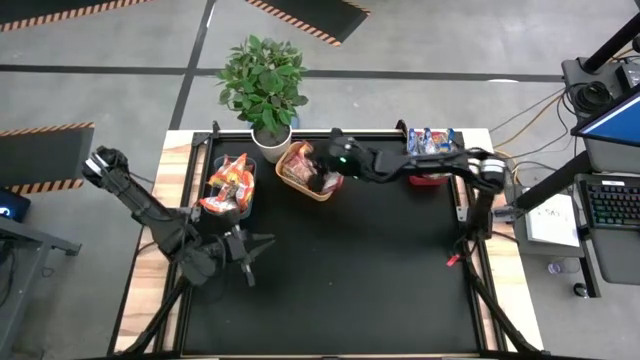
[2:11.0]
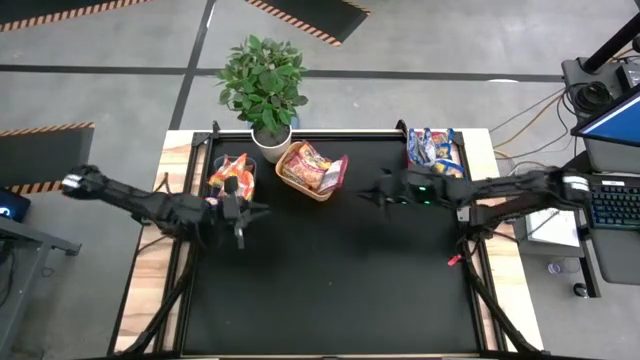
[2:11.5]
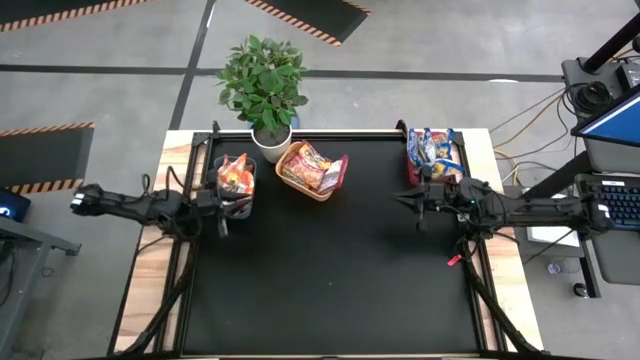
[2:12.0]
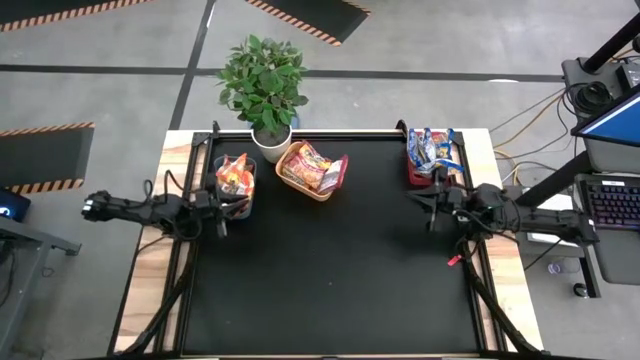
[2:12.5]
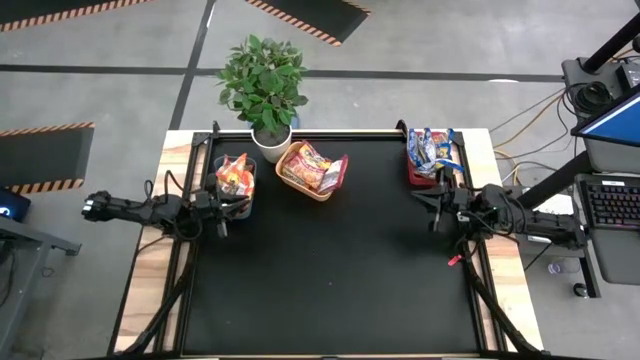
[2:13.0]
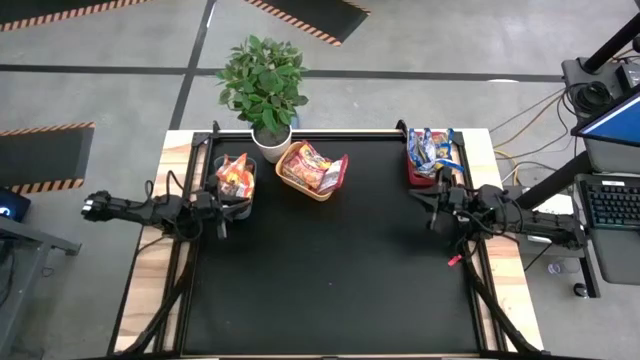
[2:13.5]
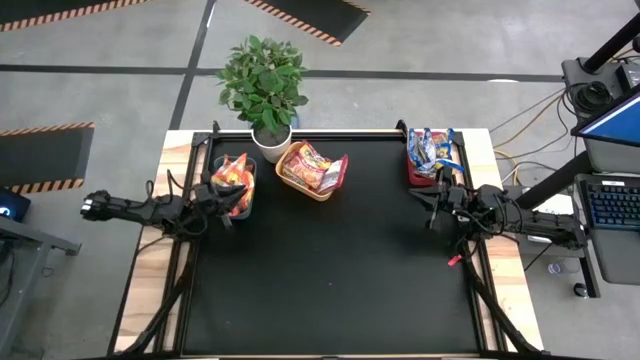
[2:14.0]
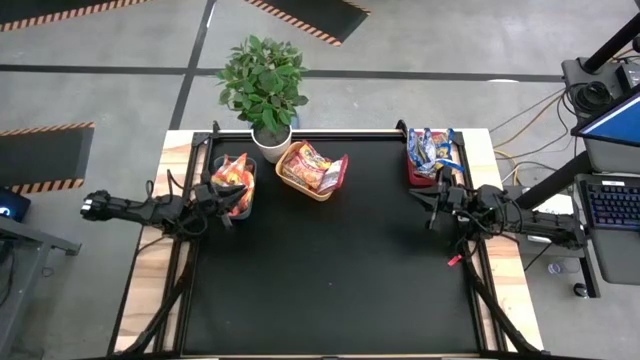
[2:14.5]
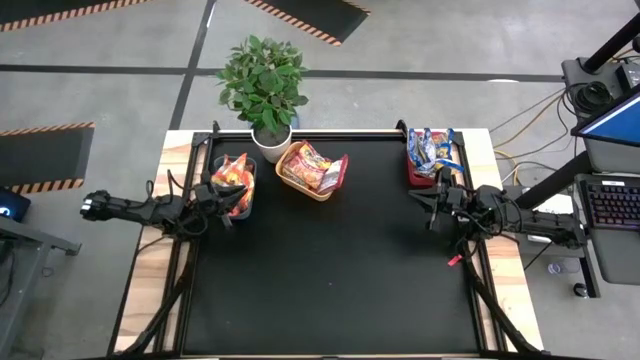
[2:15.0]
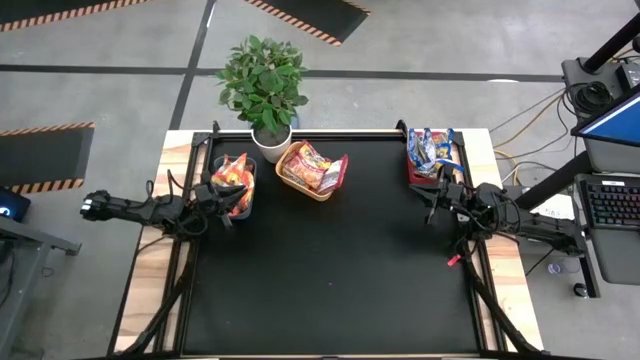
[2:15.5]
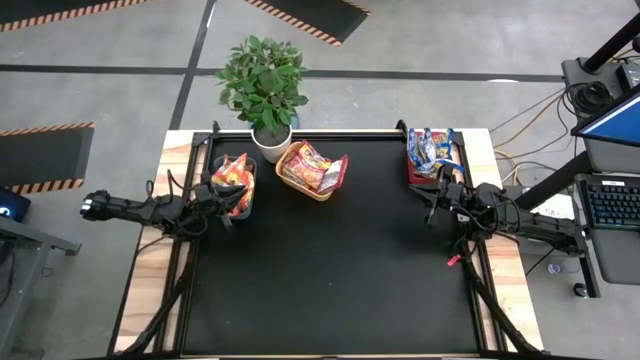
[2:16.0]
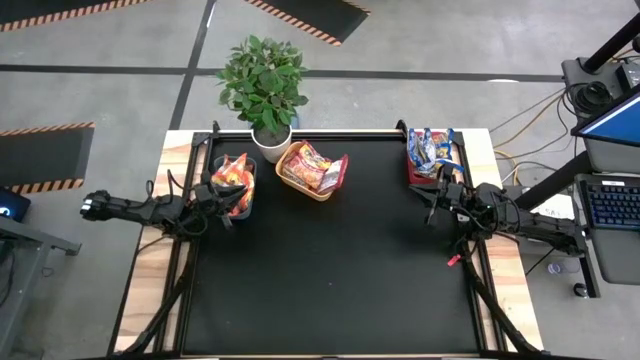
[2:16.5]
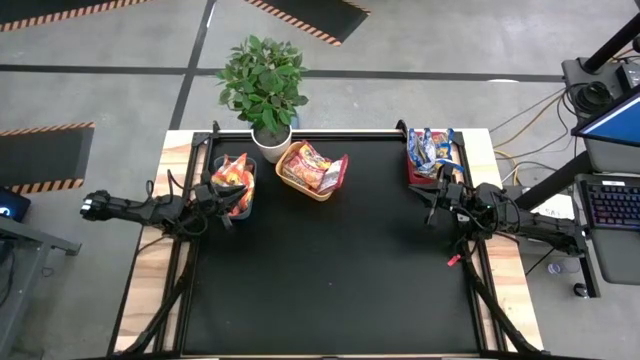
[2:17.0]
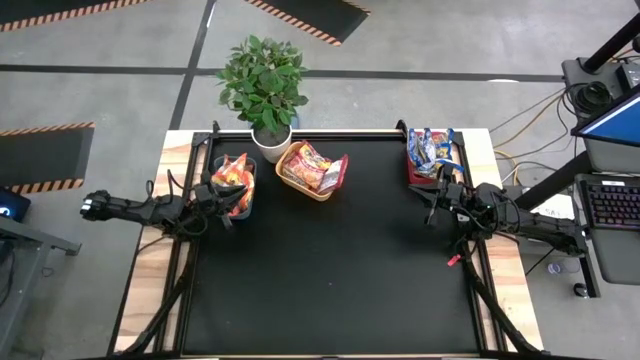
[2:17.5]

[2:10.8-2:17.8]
Task: Sort Maruchan noodles
Return to Home Position

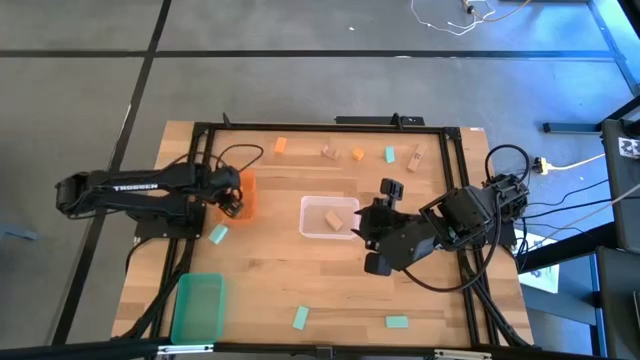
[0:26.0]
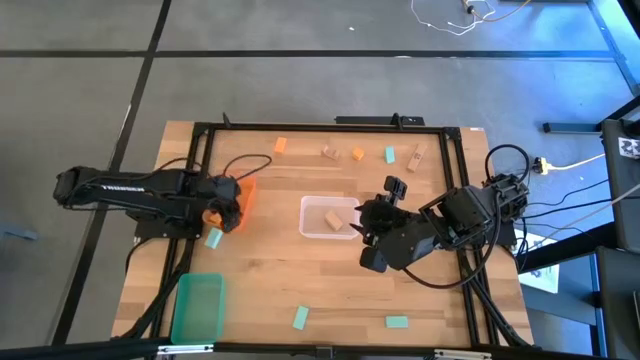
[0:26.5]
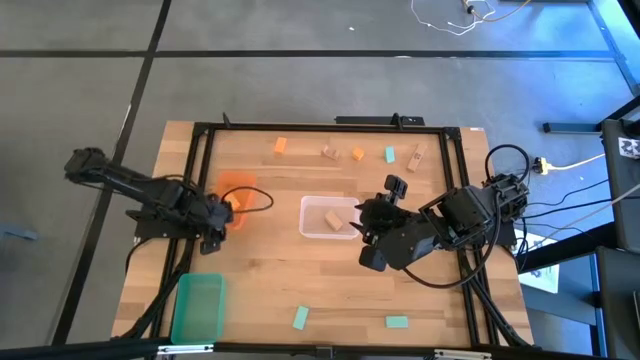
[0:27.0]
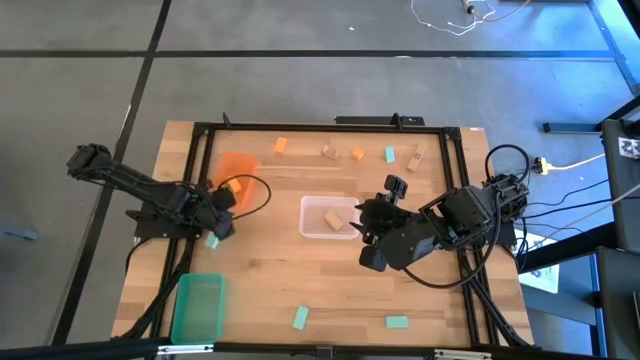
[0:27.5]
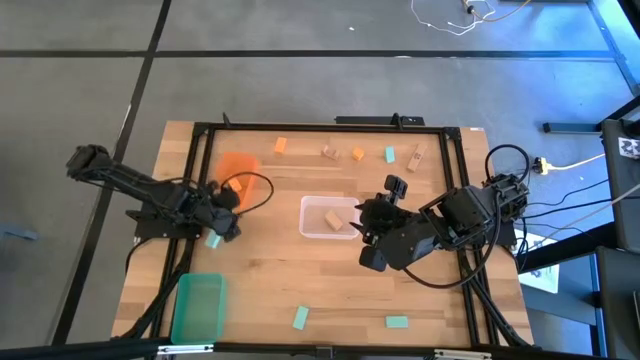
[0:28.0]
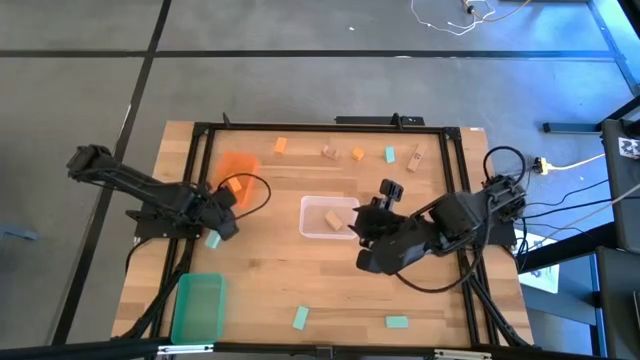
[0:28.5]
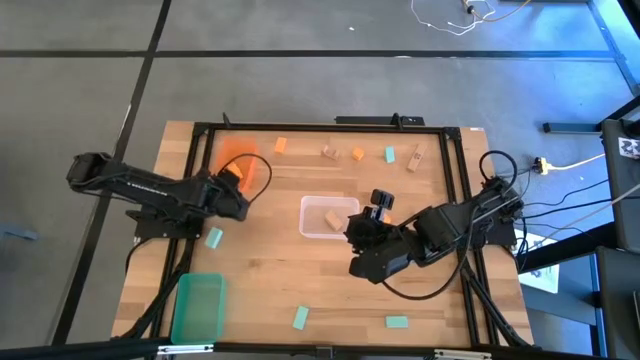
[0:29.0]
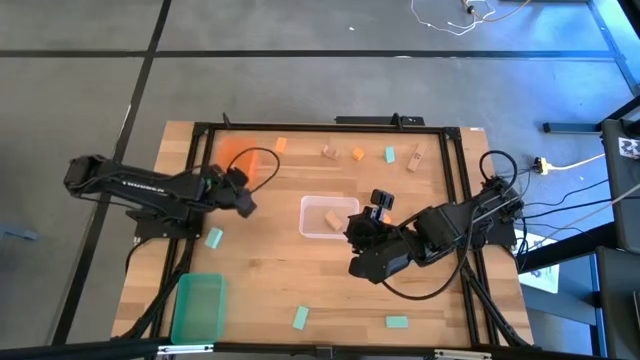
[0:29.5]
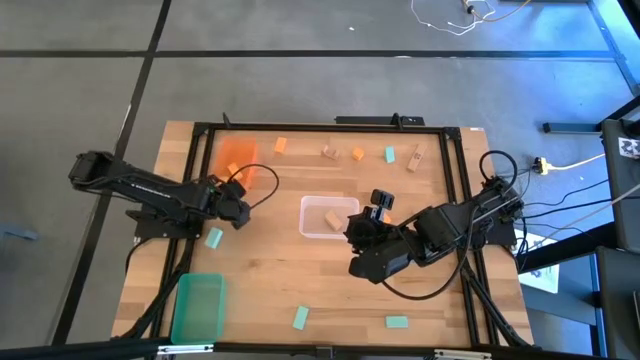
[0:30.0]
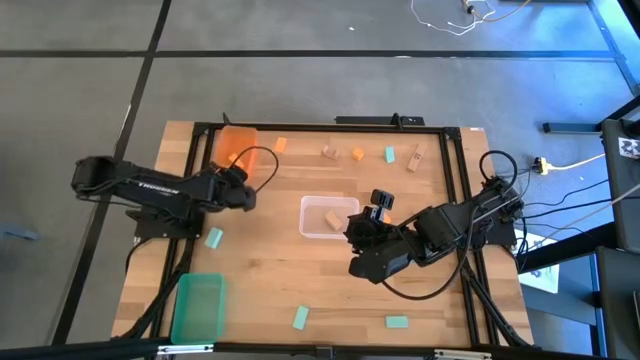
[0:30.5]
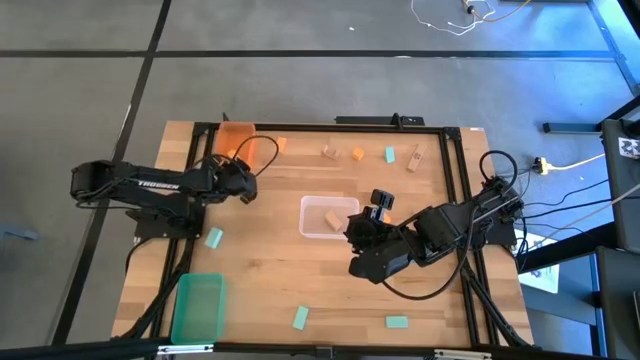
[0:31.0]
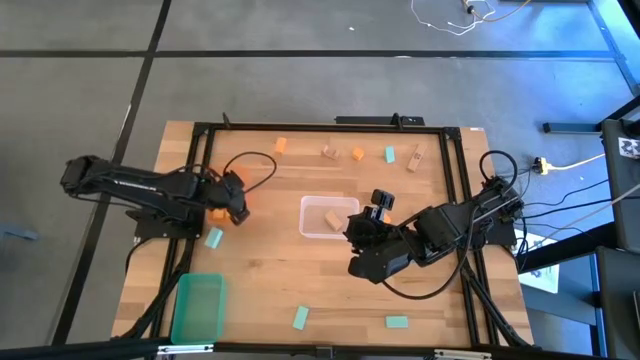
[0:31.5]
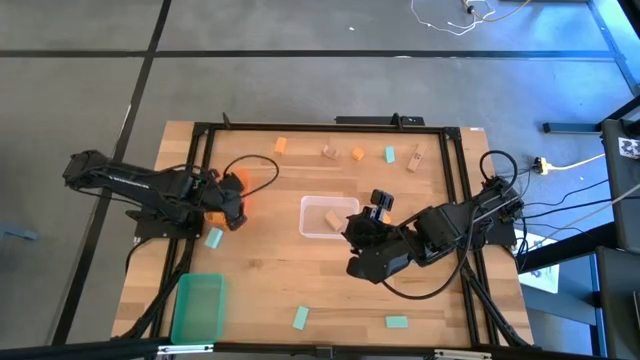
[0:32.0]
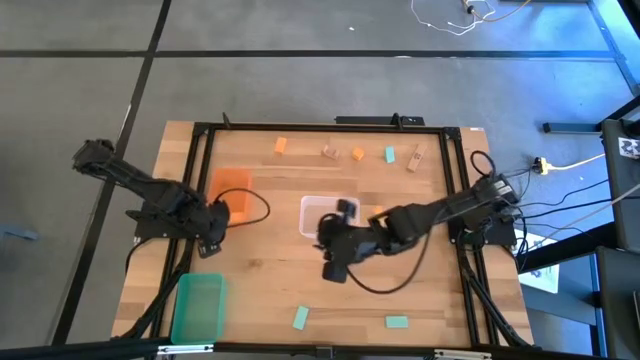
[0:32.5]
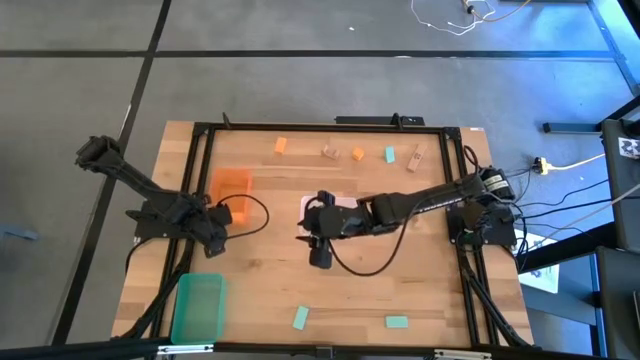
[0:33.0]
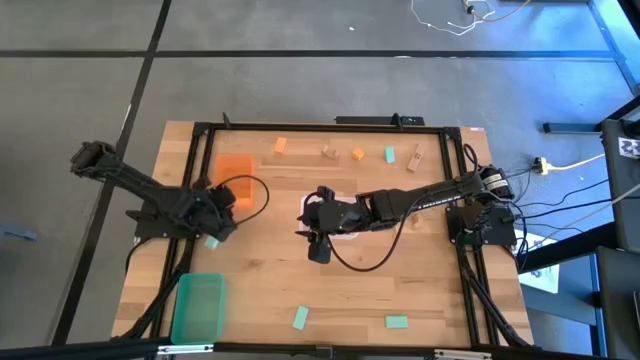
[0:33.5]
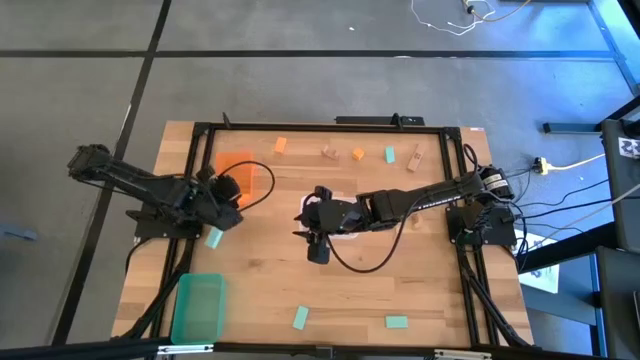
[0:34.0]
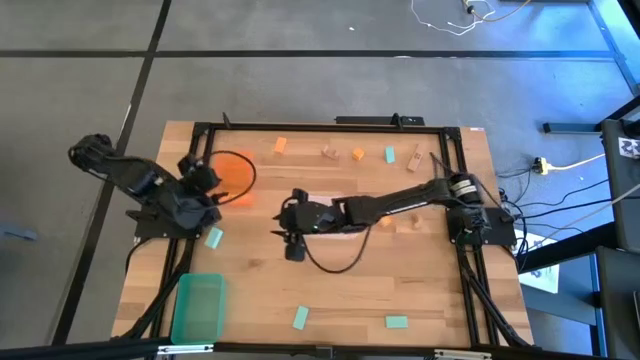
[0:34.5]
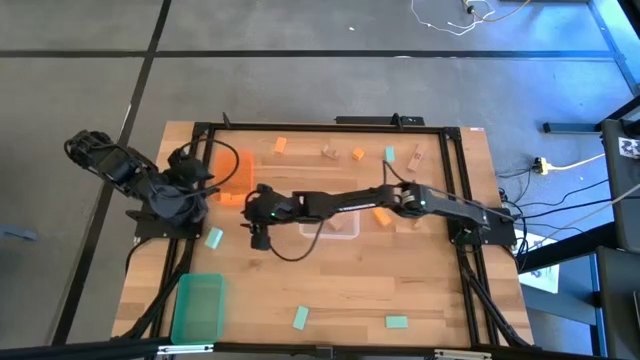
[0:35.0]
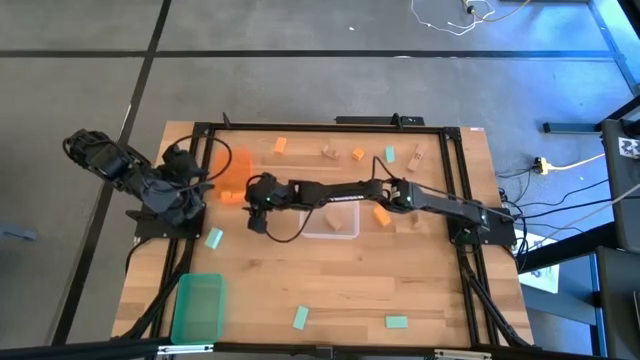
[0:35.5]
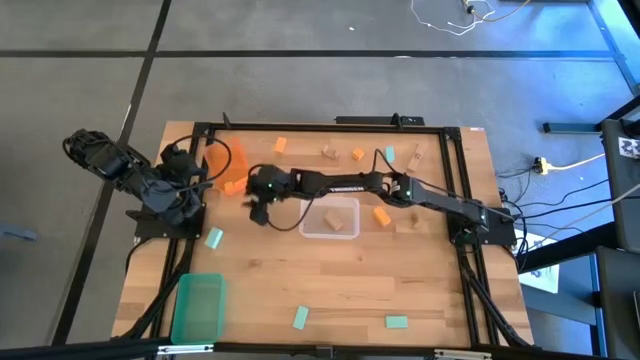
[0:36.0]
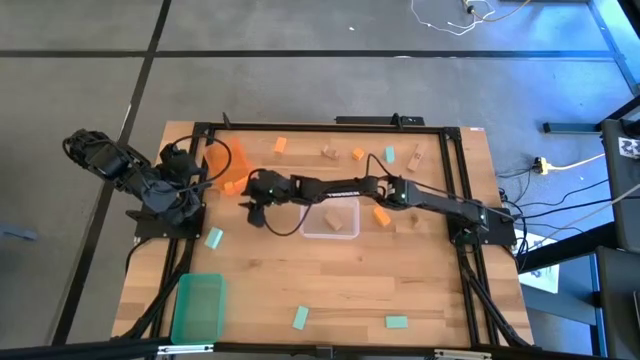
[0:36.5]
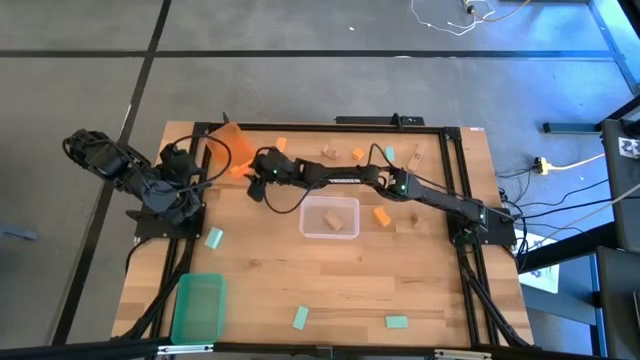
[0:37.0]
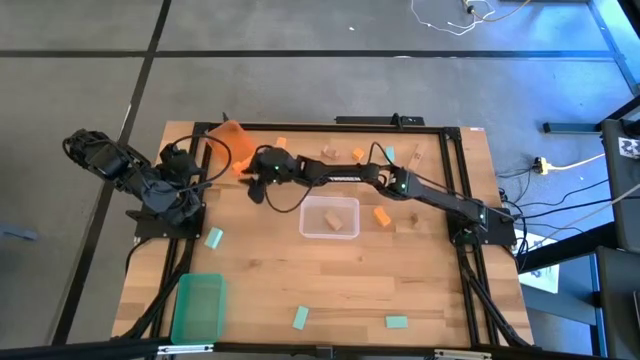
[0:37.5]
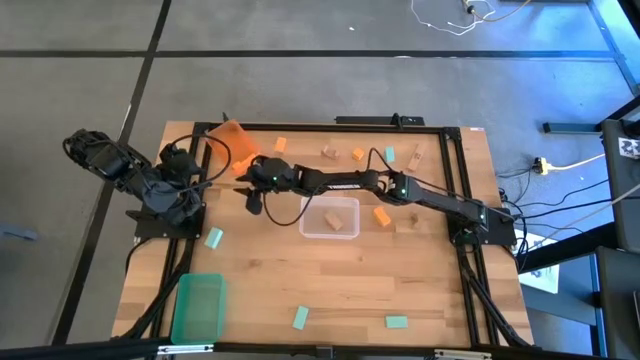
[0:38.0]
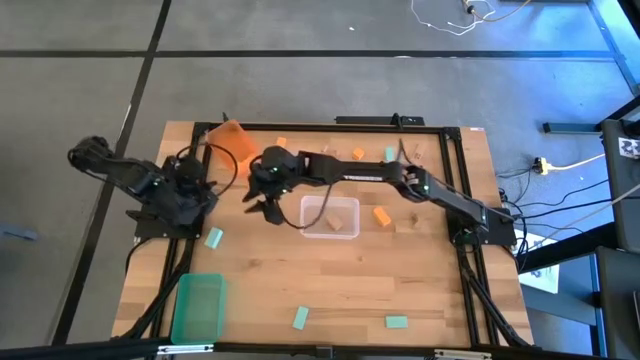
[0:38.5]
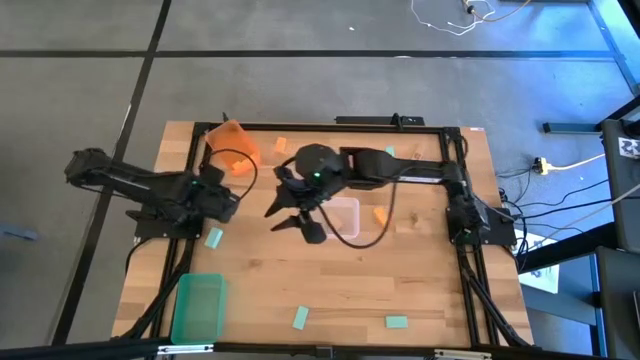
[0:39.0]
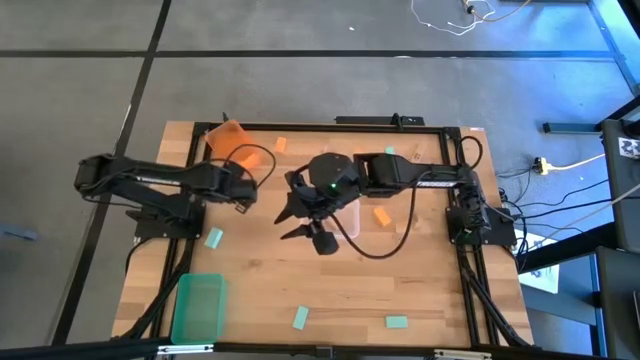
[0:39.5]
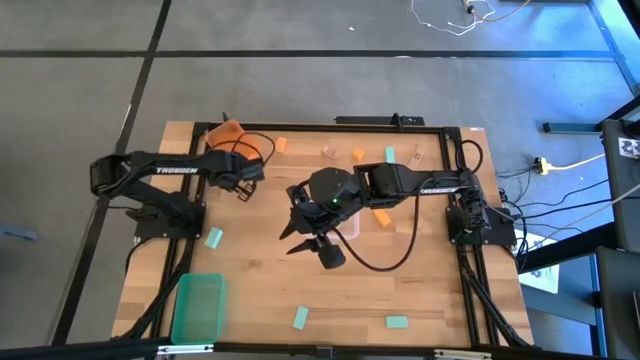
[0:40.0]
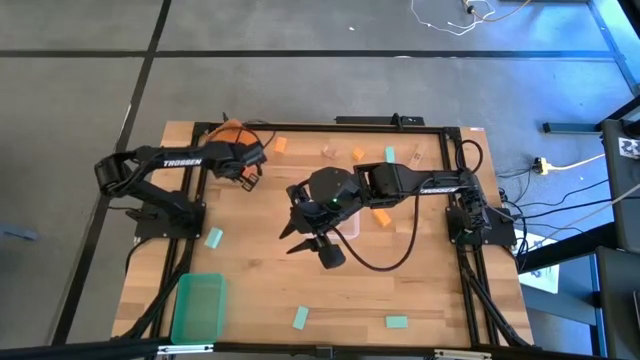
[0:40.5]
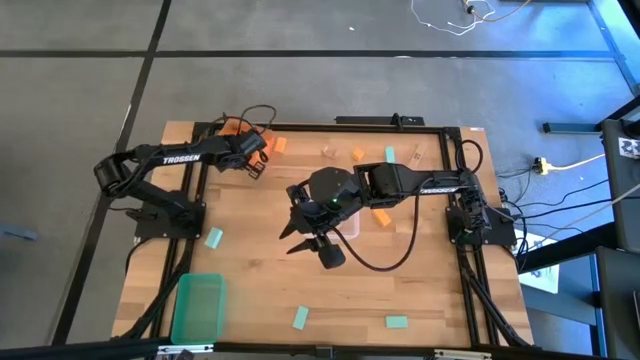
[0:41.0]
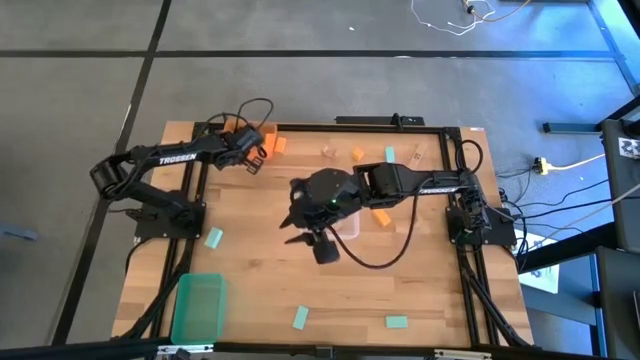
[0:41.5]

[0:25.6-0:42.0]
Task: Sort & place blocks by color
Move the orange bin to the top left of the table
